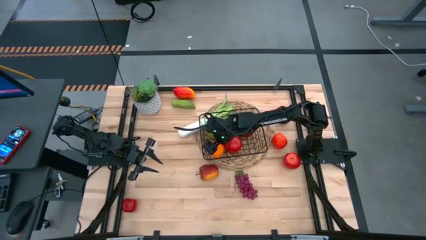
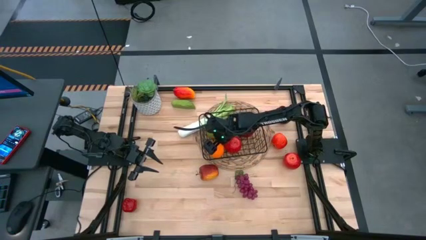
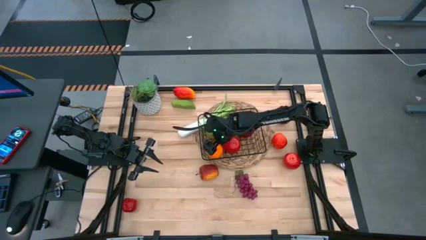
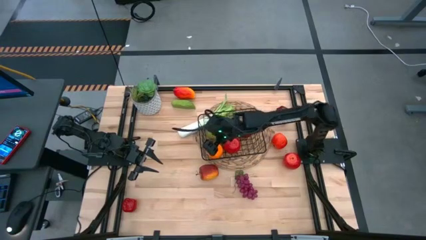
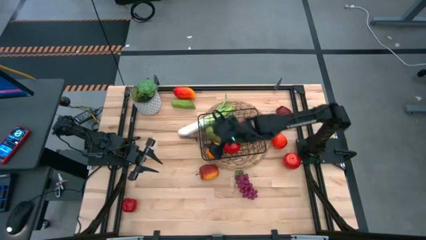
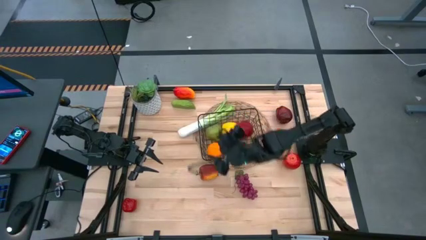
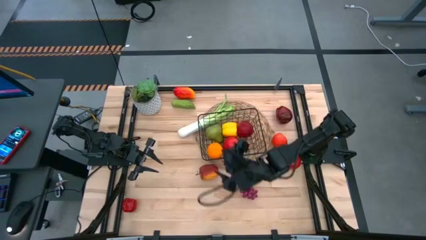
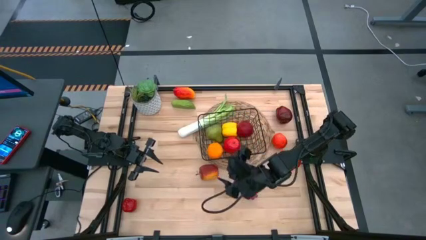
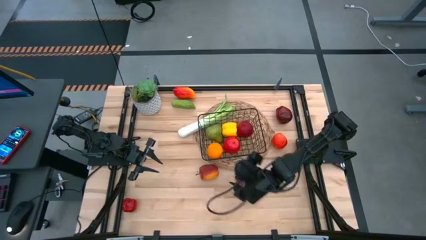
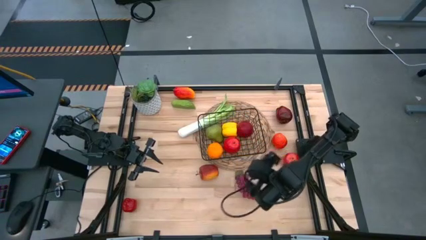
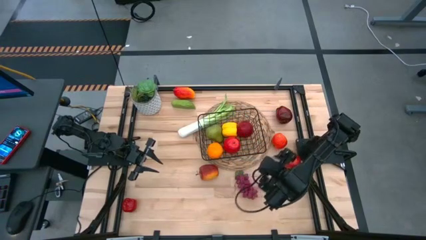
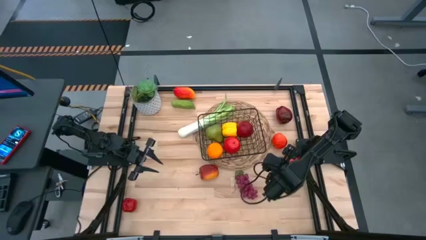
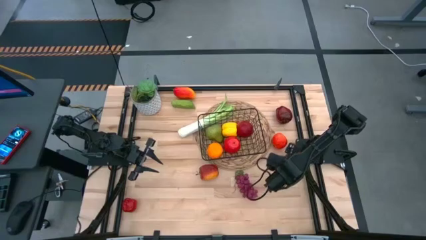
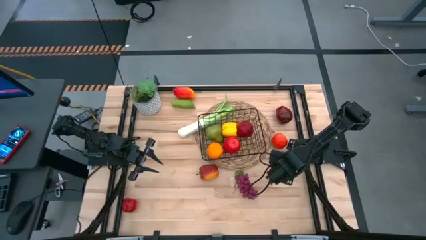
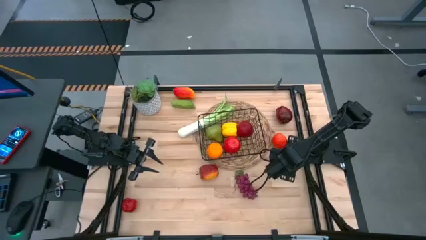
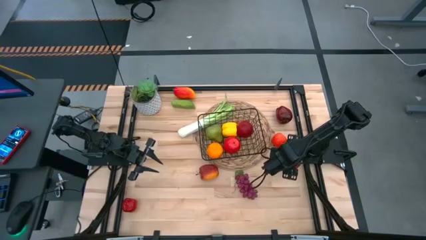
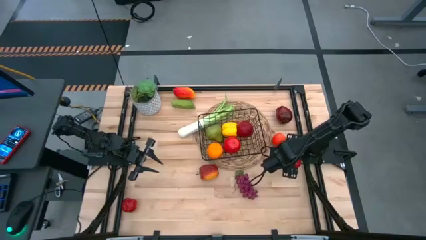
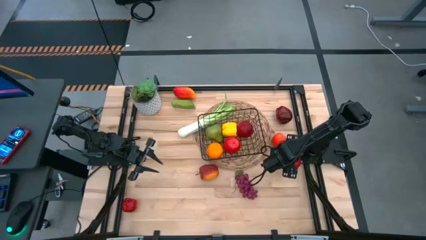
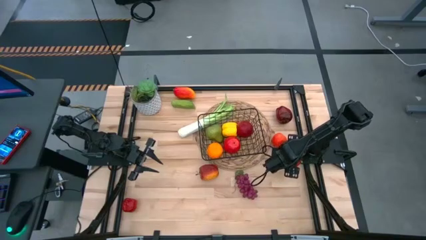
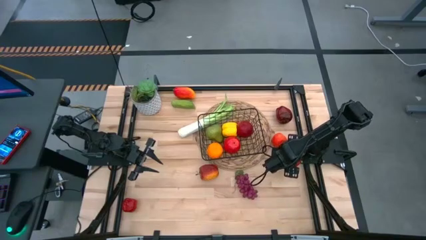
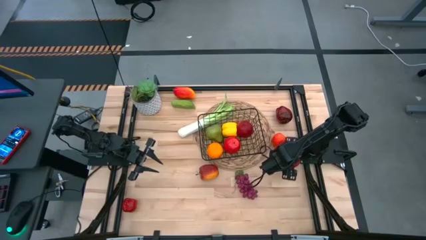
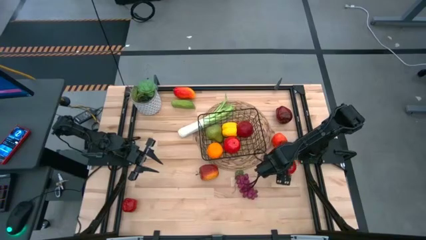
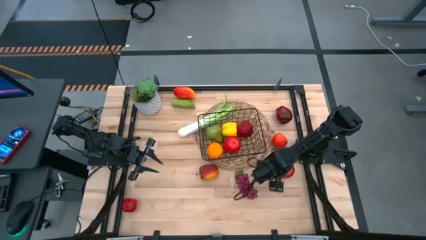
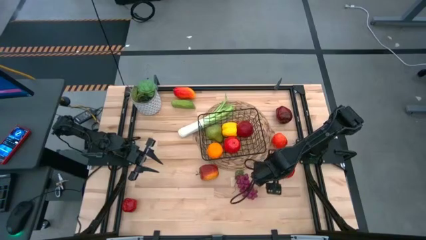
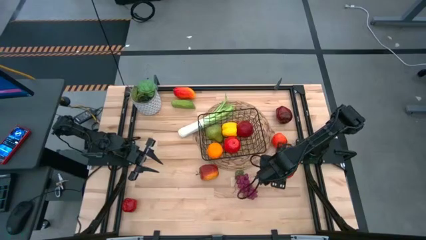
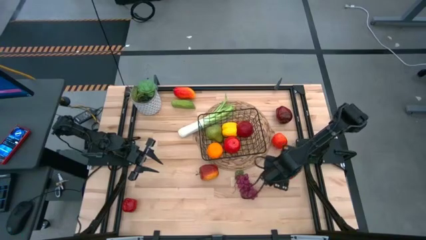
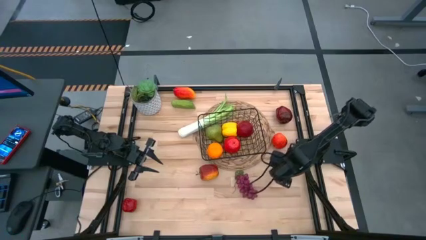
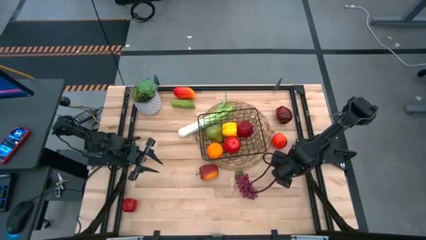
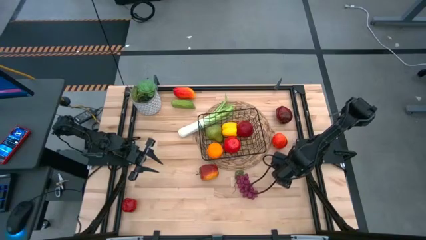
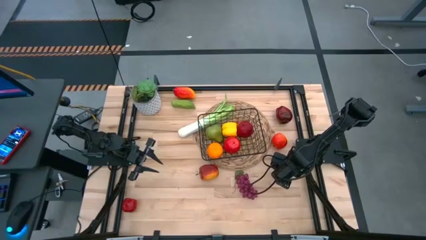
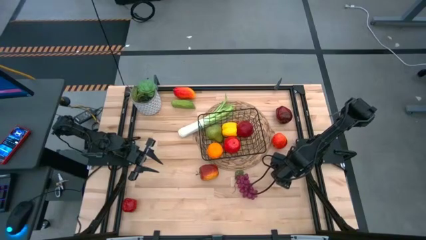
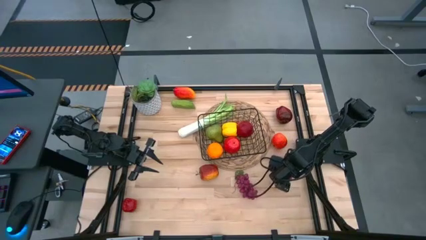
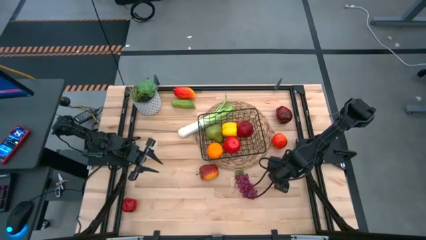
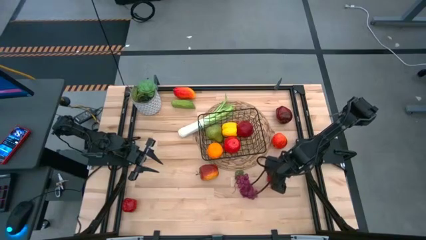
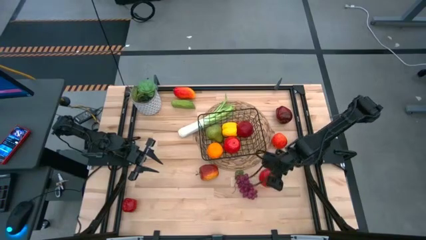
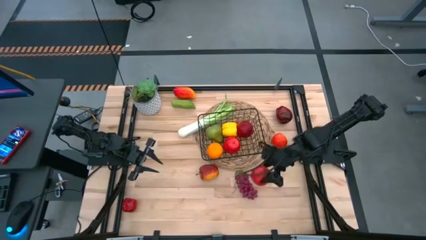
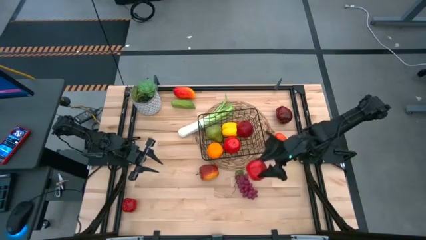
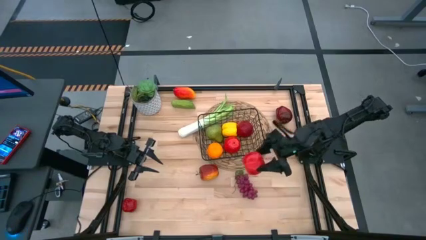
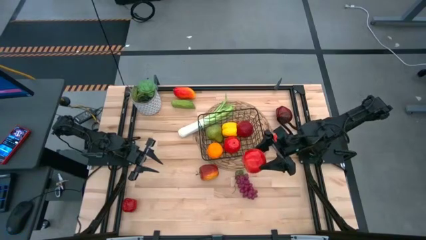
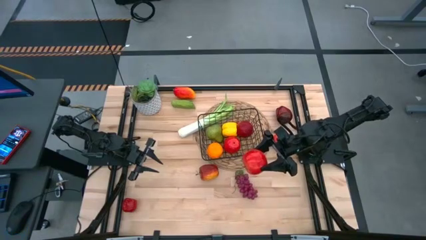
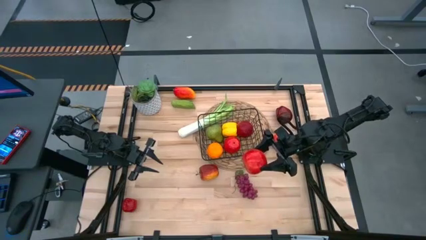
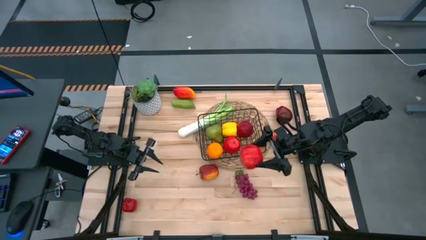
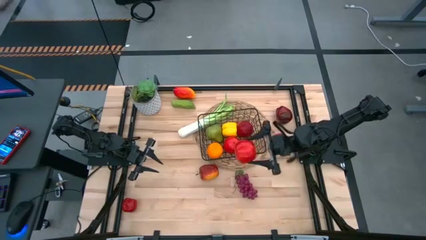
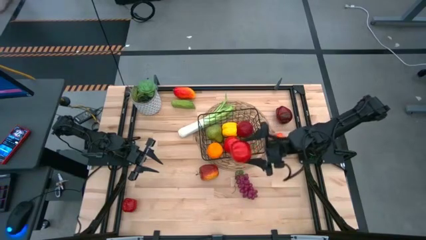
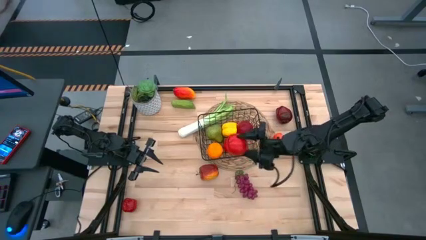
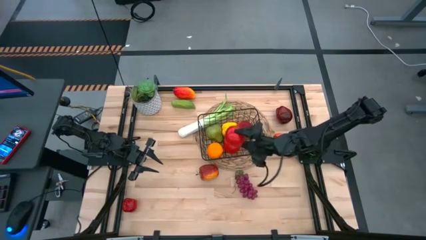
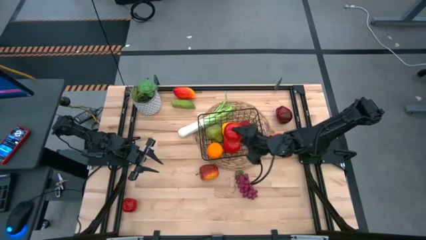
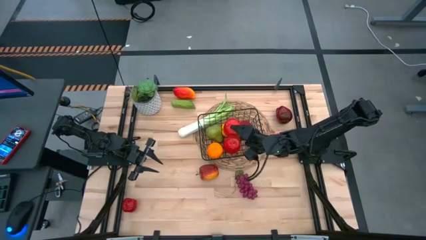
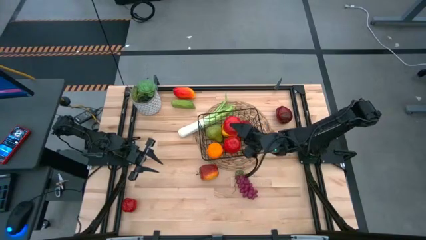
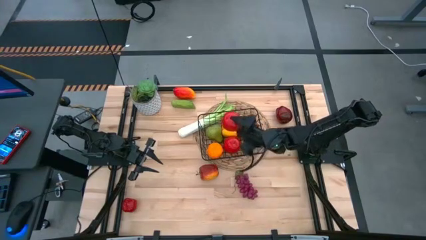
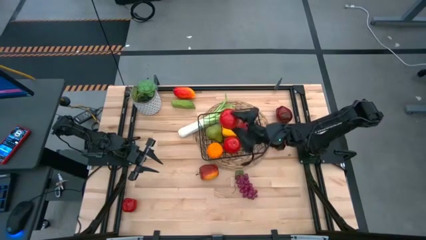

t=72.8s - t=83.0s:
Task: Build produce basket
Put the apple into the wire basket

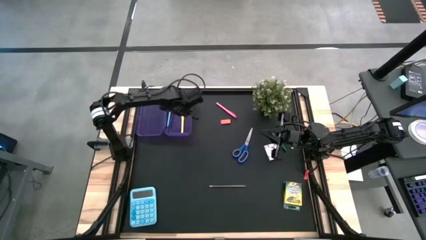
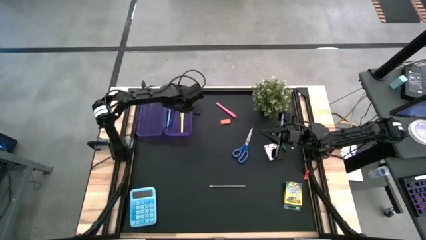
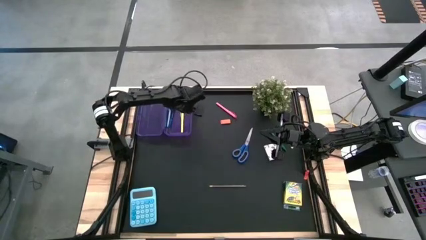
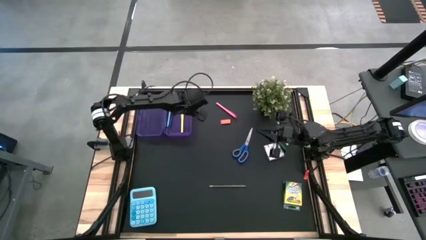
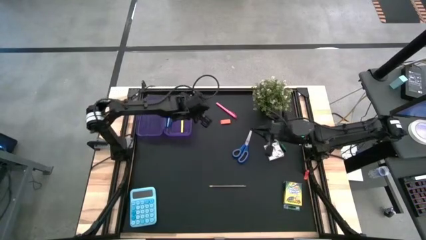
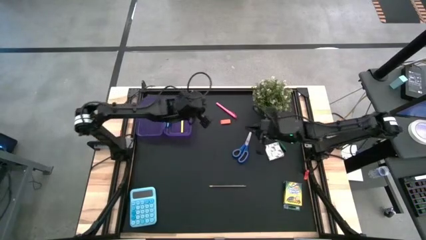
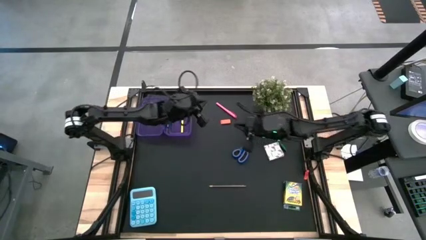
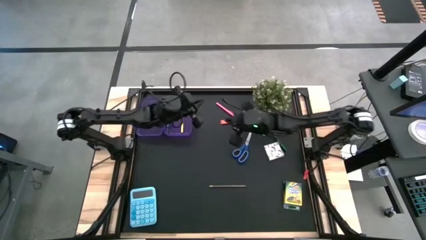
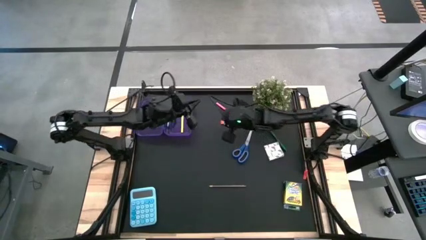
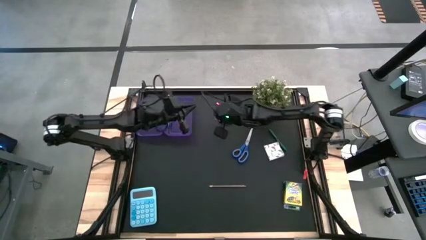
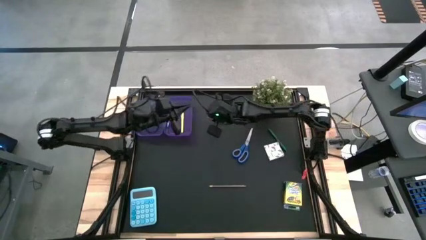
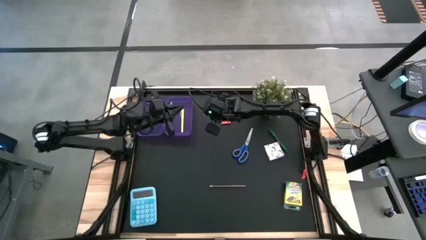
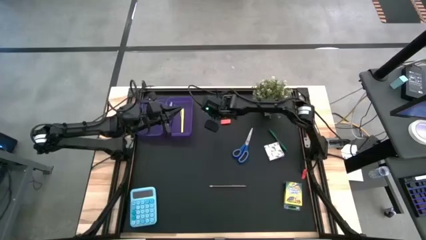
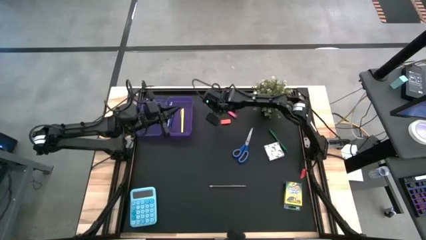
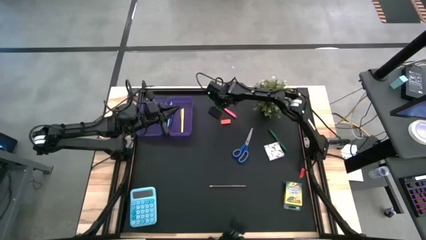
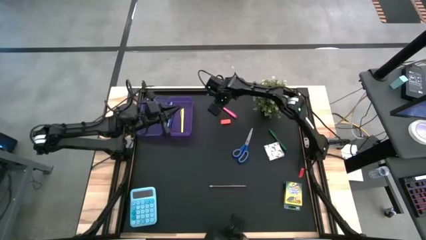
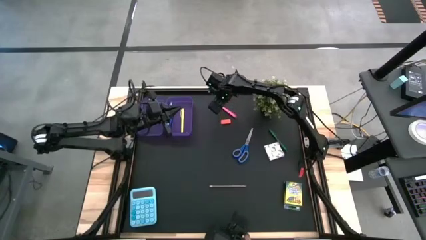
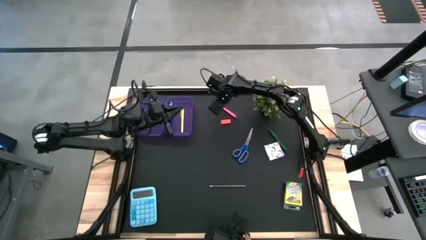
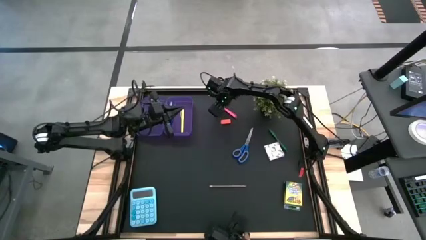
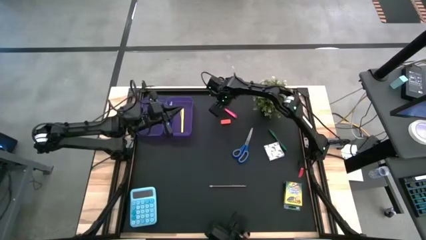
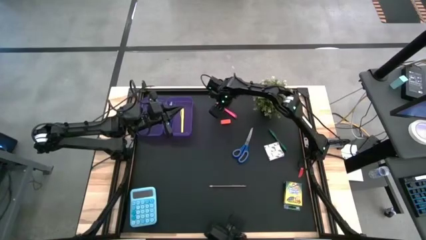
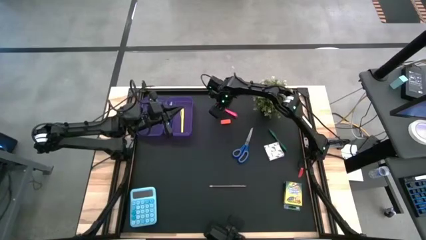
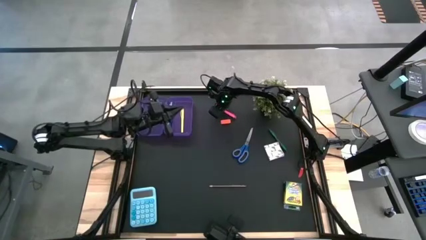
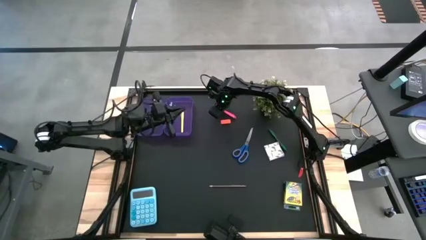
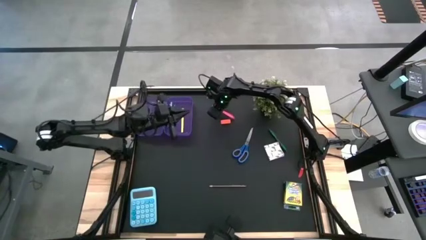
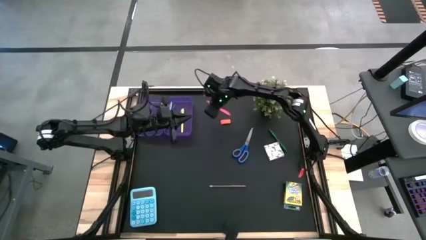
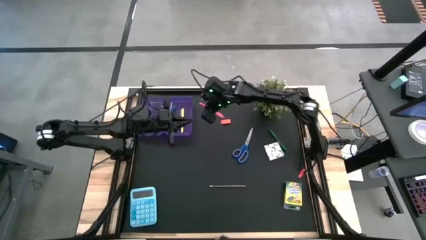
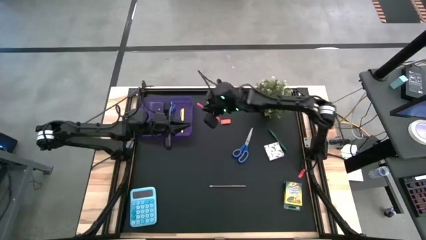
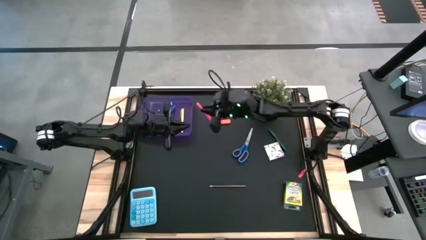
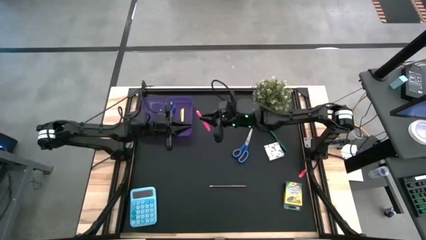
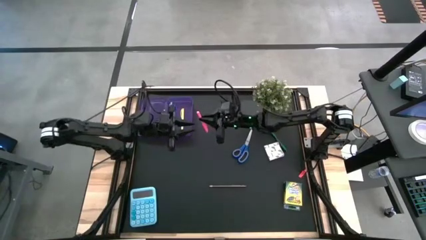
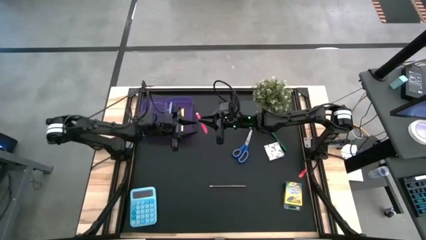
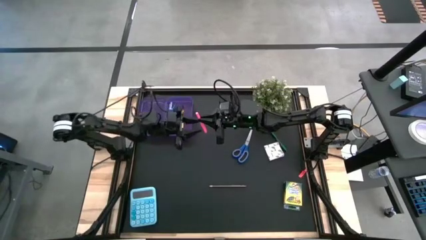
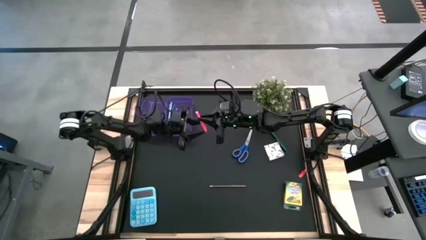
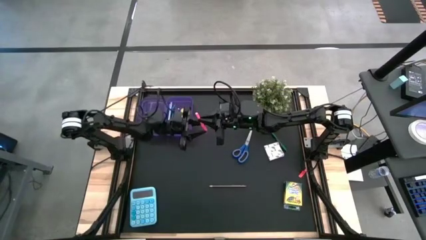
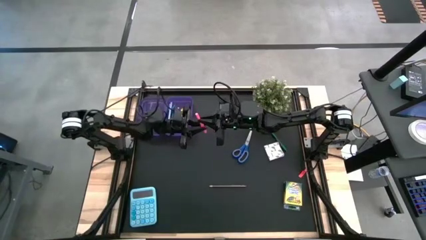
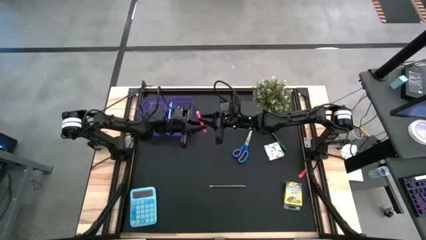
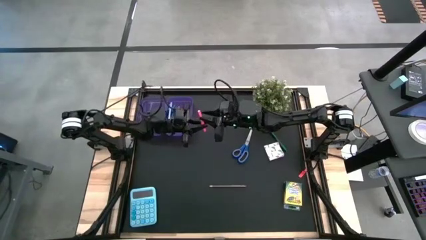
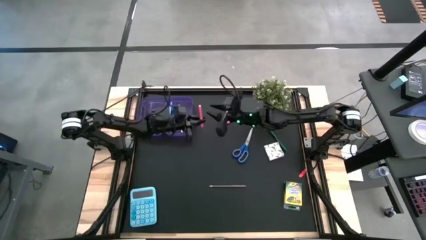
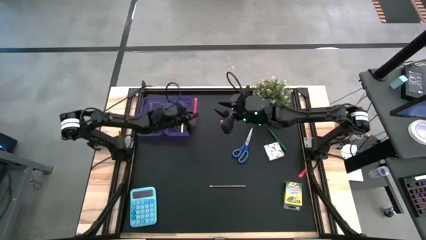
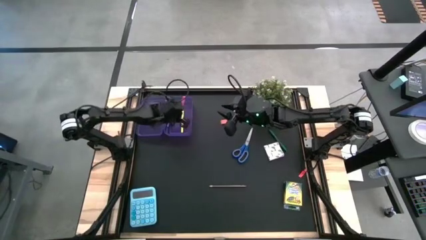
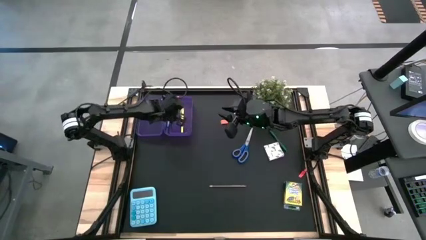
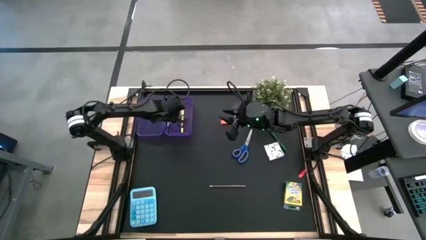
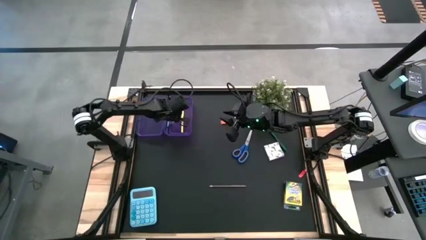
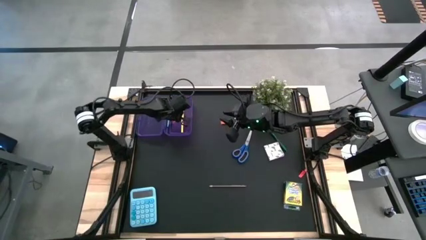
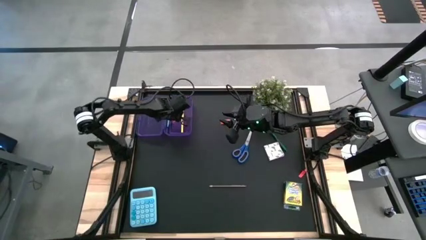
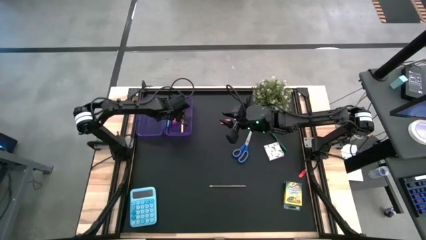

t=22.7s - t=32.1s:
Task: Pack school essentials
Put the pink pen into the purple box
